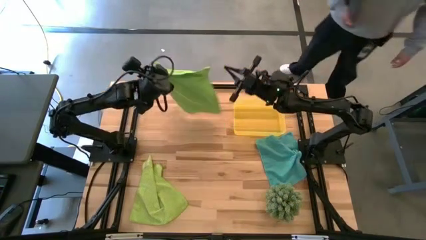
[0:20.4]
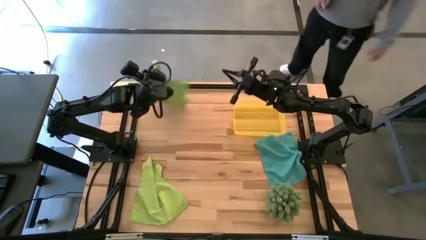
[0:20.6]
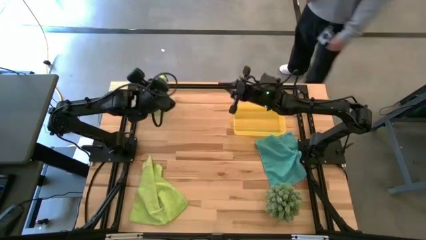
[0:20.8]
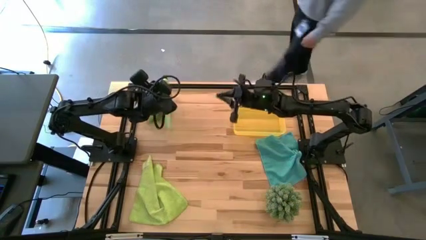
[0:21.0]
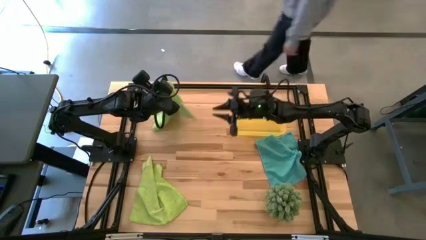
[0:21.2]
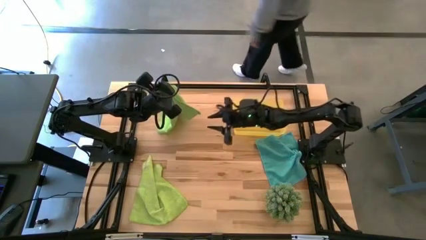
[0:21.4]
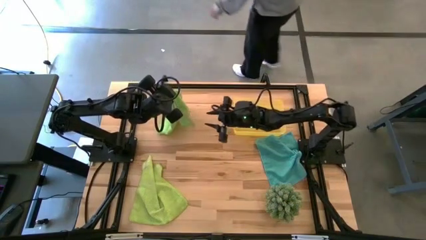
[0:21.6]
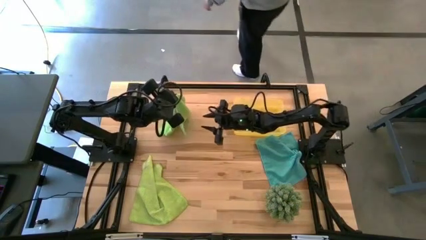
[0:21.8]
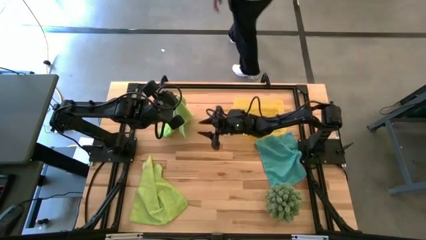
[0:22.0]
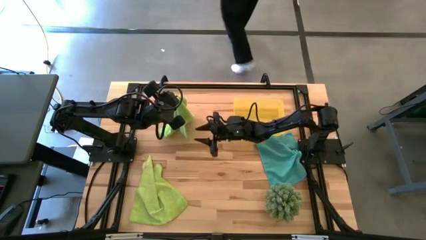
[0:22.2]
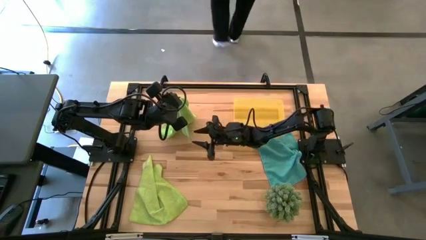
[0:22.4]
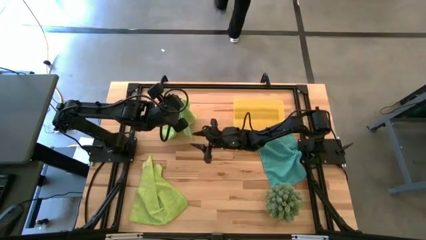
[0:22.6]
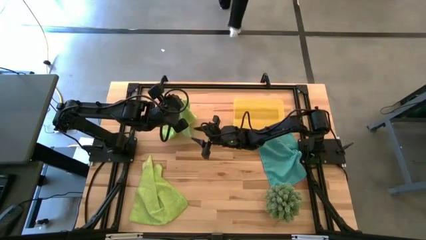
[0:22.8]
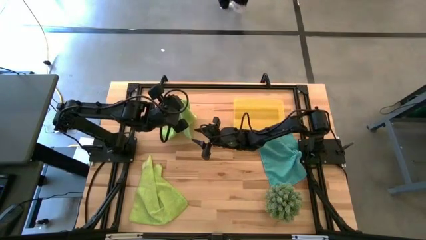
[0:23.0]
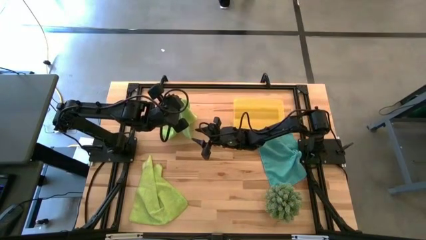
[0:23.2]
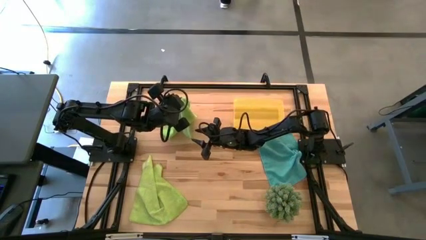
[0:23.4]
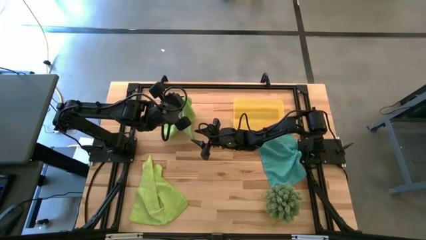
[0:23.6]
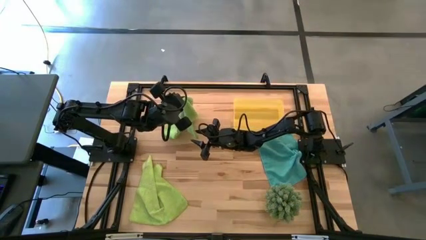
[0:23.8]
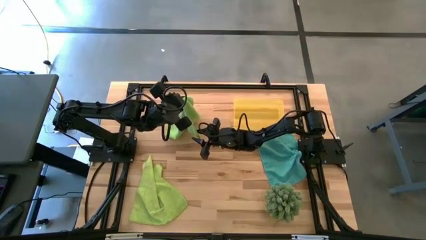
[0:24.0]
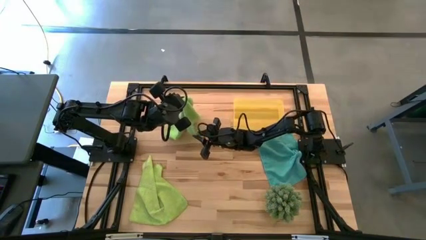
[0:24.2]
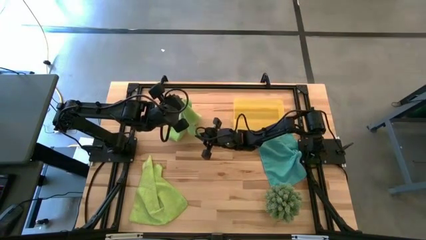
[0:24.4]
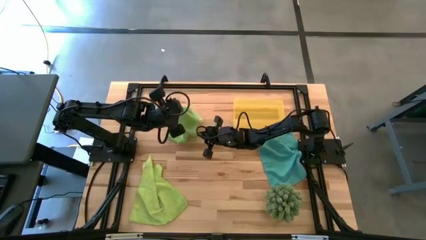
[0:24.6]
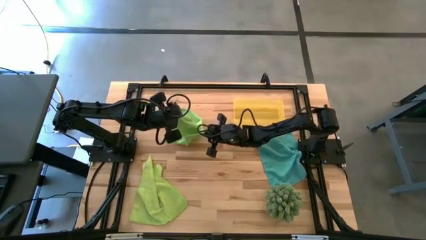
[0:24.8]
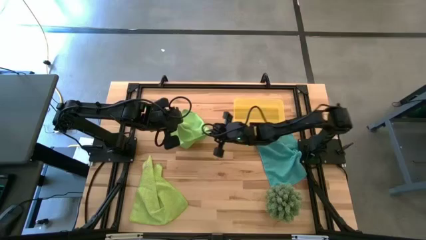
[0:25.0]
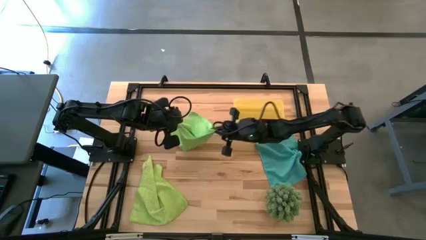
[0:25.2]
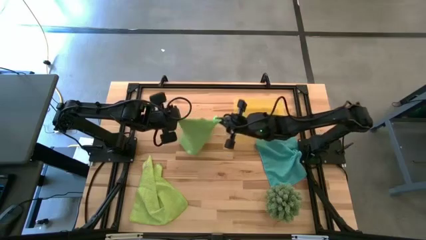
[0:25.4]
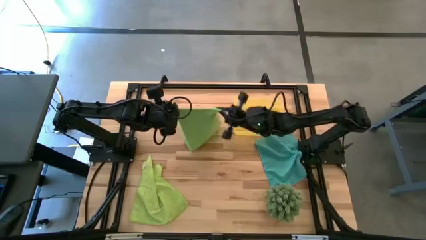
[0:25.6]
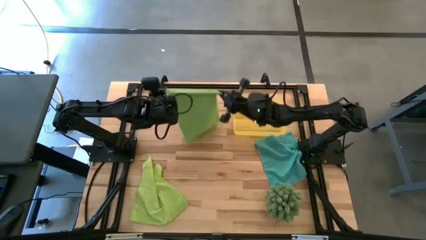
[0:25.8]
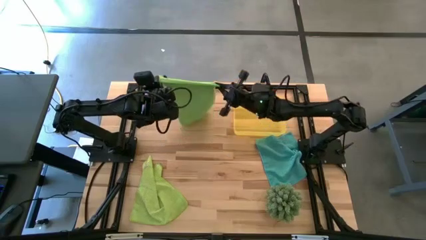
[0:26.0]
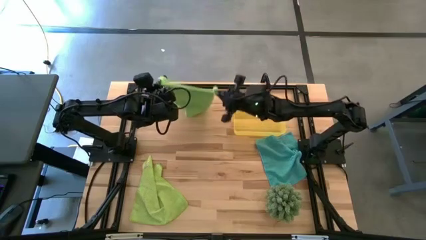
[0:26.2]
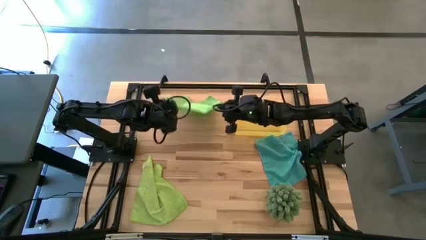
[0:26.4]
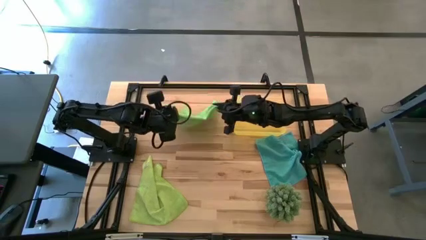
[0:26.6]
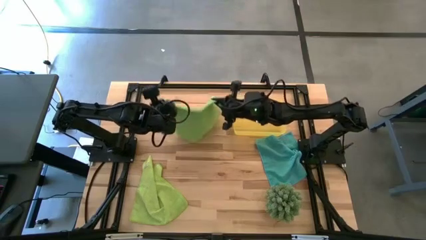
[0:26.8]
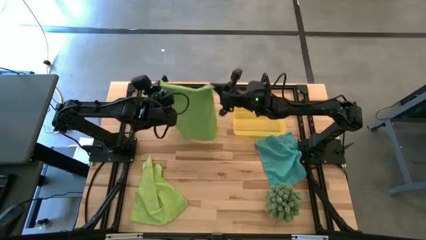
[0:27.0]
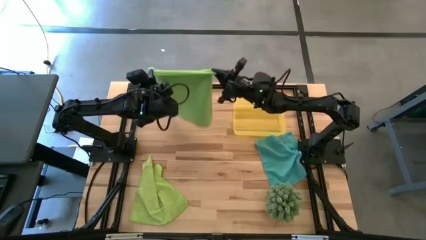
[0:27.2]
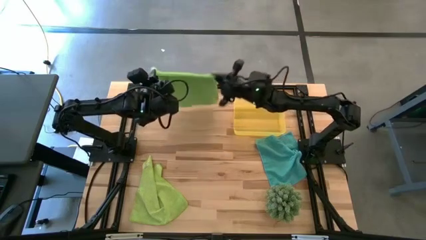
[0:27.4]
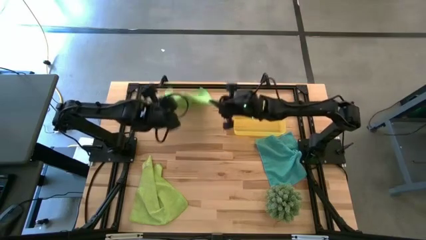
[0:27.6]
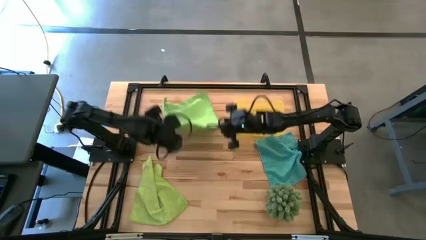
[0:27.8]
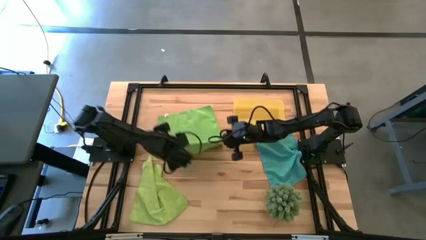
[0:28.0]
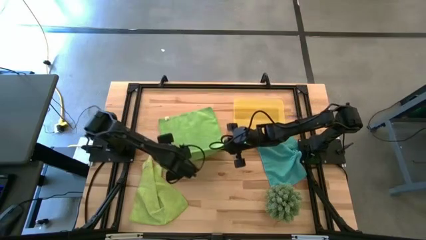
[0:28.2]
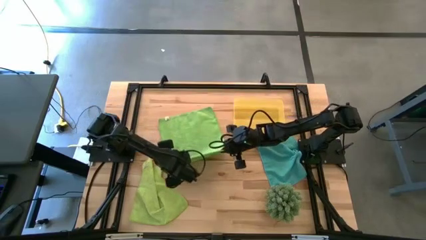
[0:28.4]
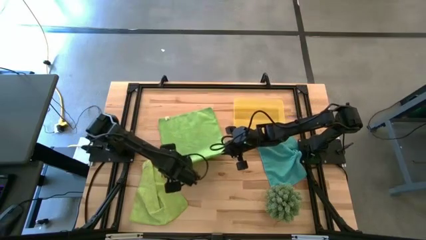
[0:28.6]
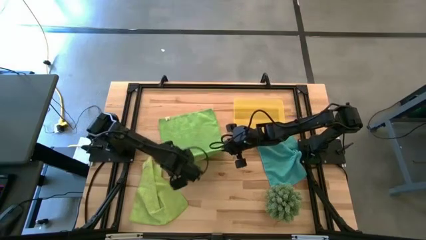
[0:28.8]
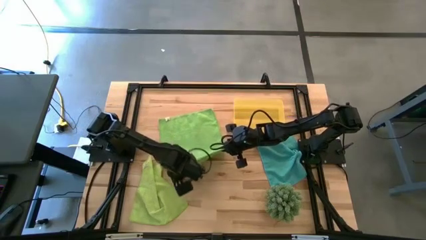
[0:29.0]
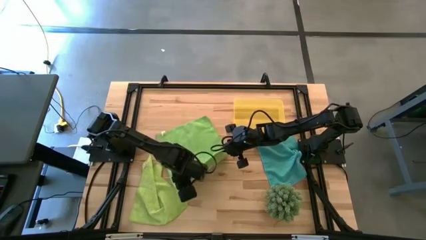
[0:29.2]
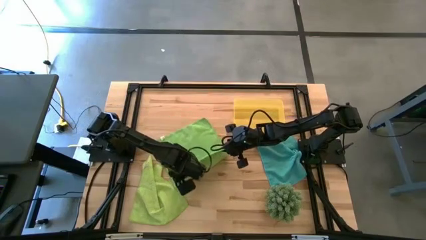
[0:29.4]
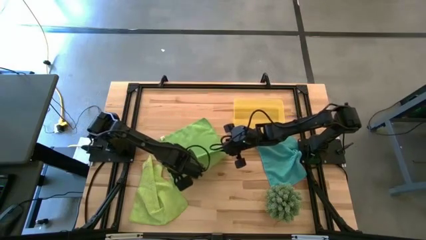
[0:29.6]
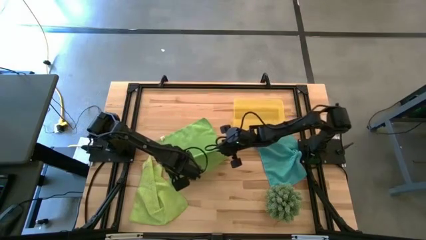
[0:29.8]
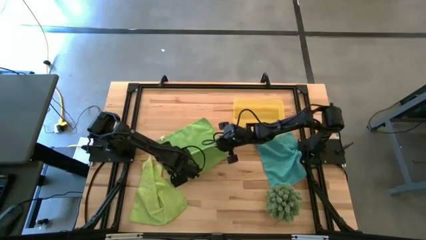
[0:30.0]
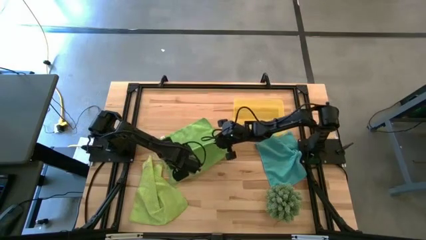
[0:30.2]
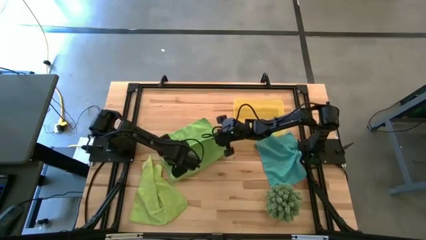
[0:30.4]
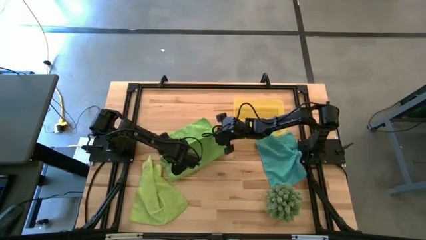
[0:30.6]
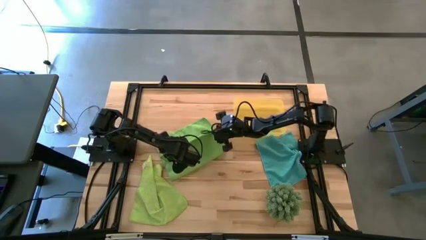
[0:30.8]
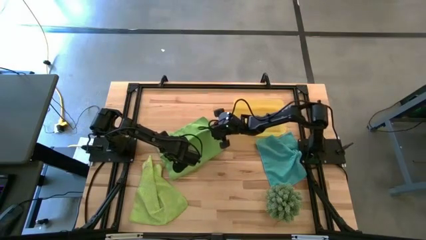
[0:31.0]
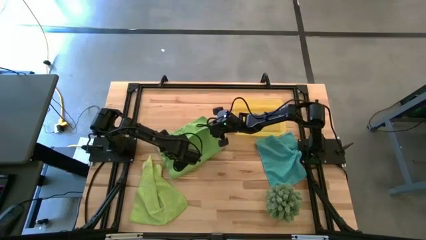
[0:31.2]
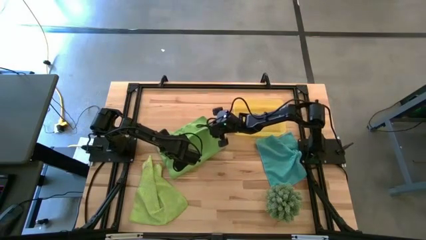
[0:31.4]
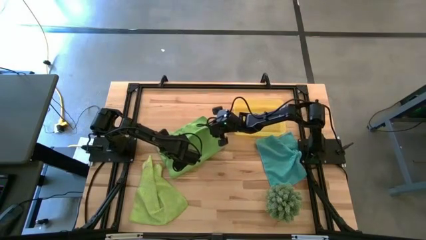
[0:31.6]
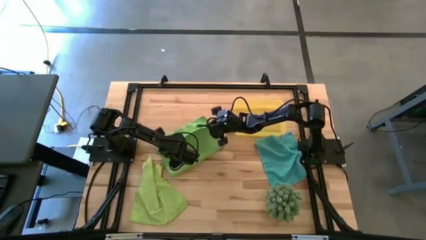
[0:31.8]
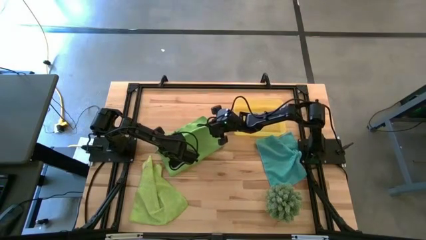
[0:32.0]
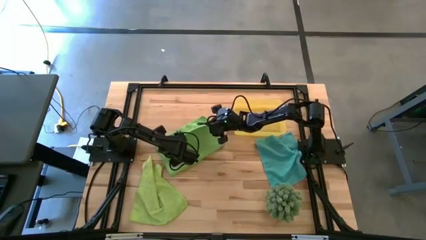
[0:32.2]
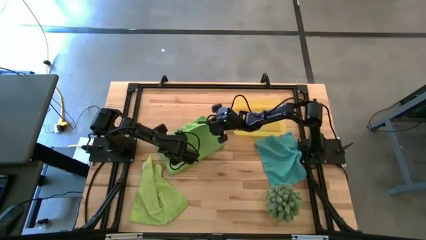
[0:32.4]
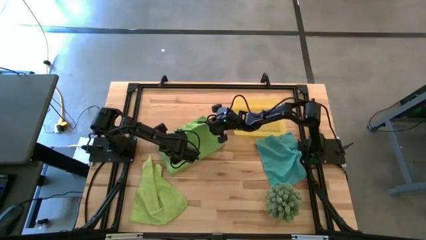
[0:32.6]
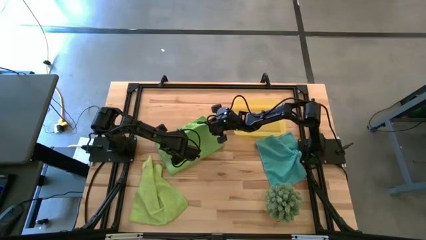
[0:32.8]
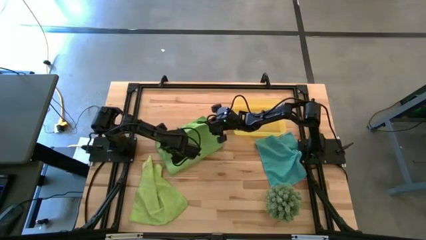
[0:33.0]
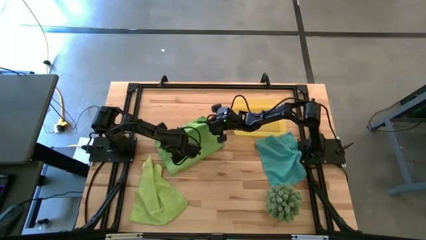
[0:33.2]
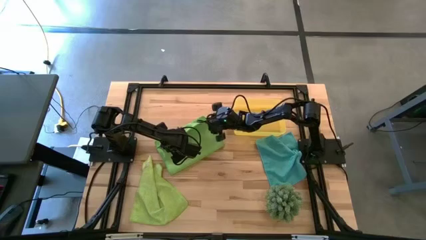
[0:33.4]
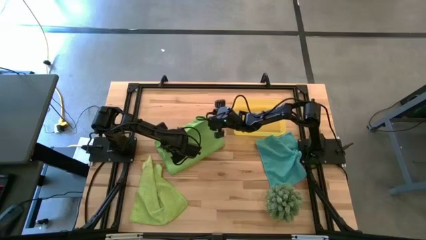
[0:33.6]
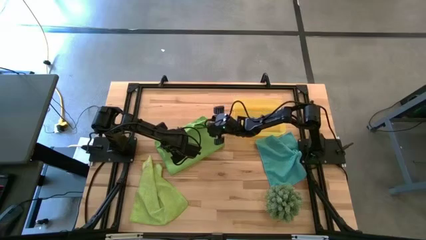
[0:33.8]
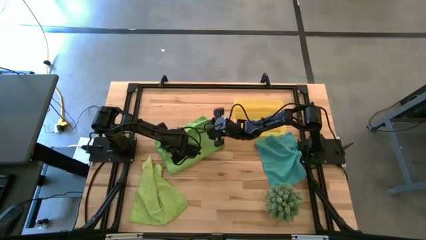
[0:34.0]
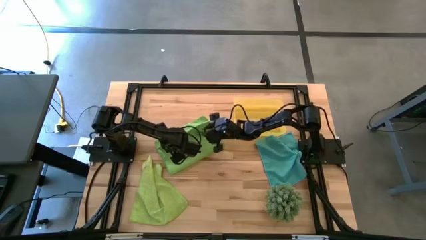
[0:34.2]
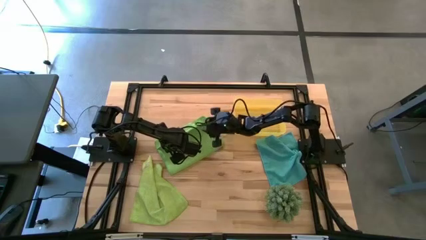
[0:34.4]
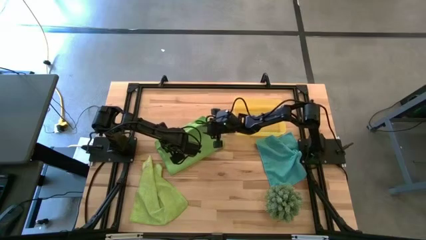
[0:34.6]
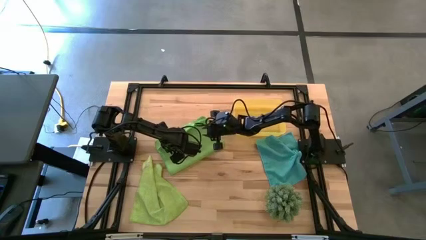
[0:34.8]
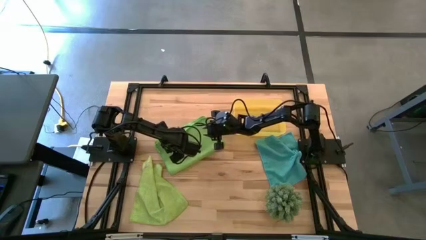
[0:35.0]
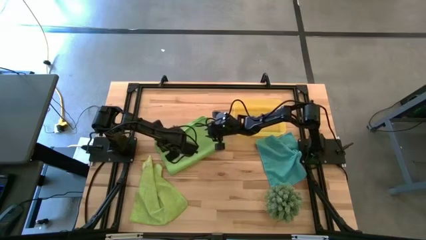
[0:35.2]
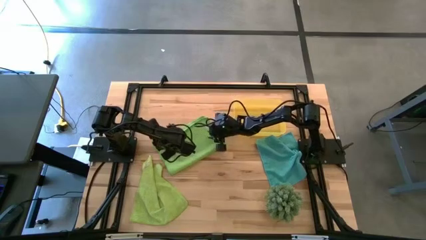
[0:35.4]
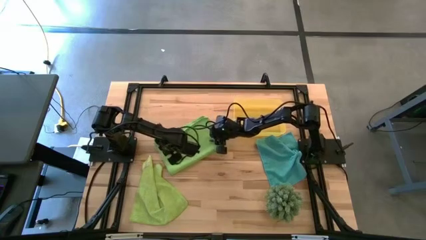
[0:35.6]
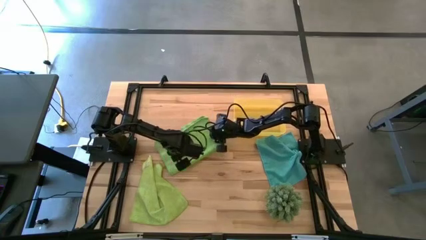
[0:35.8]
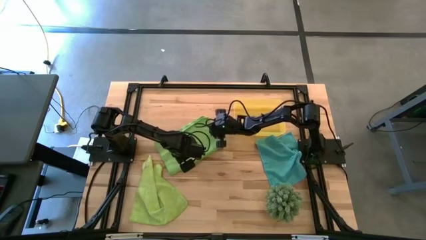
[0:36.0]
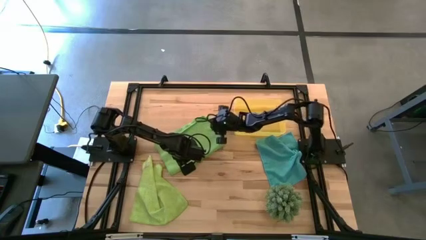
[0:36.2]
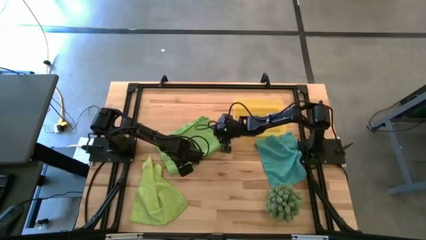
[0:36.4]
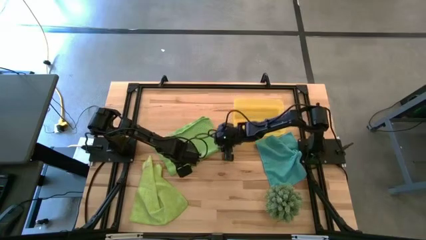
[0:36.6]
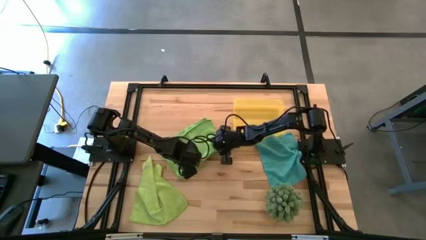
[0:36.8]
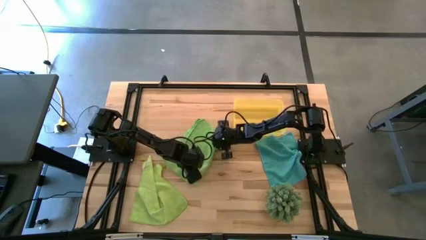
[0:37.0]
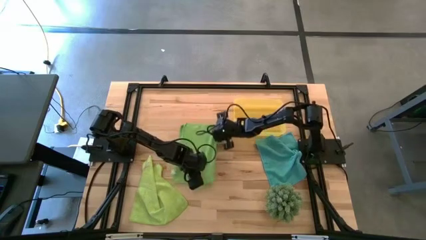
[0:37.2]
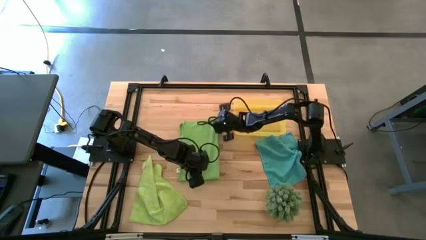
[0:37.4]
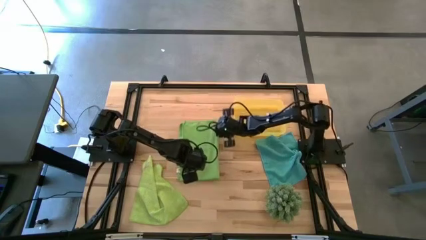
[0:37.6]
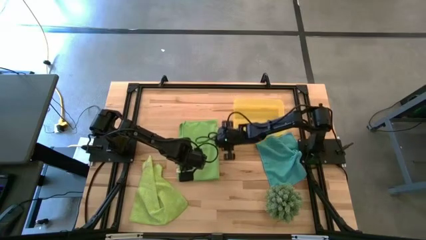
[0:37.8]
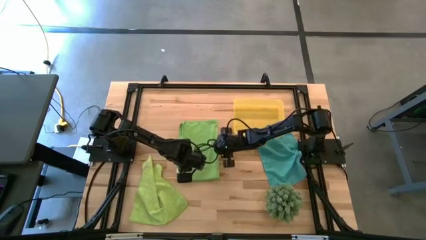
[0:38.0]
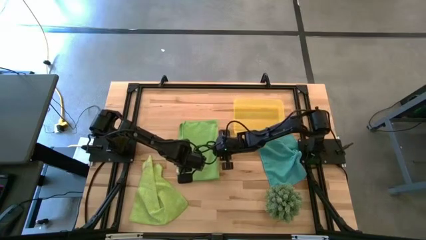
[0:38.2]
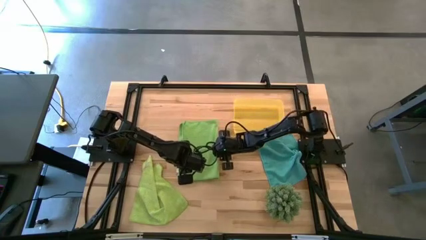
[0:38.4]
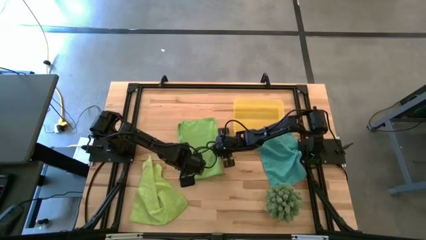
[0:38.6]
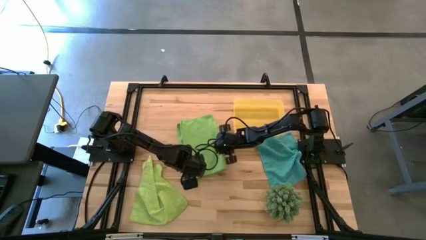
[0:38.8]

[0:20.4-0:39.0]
Task: Roll microfiber towels into tight, uniform cylinder then place into a basket
Fold the top green microfiber towel
